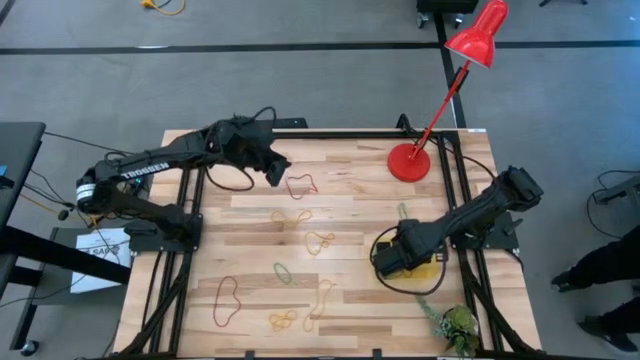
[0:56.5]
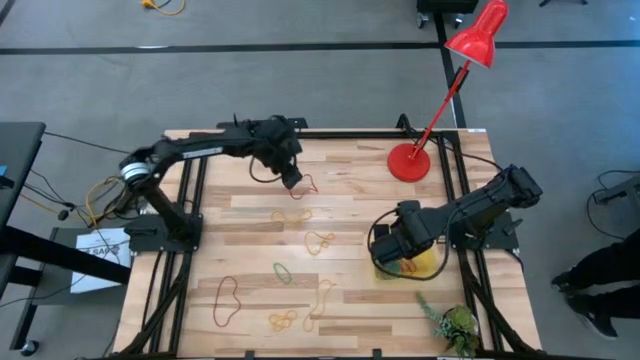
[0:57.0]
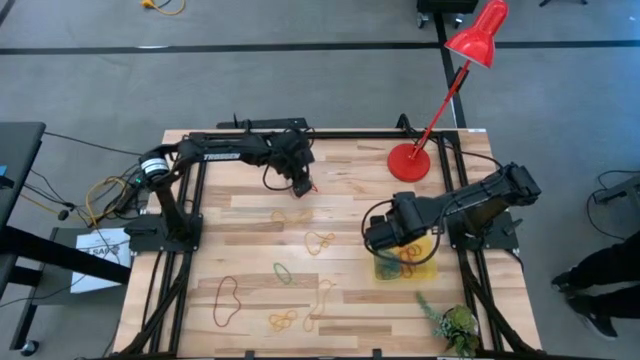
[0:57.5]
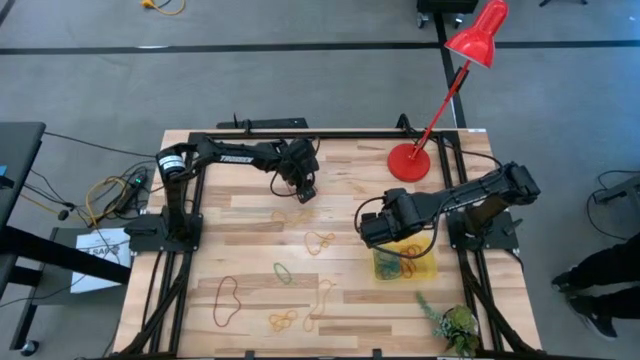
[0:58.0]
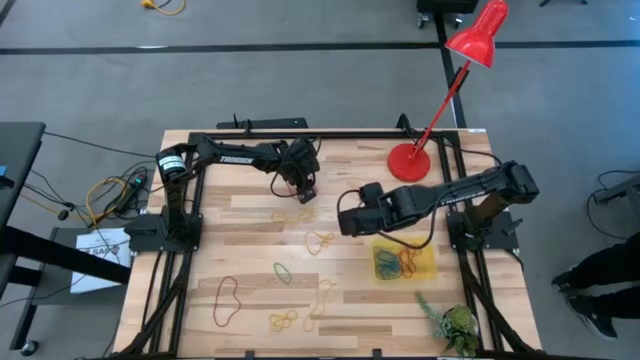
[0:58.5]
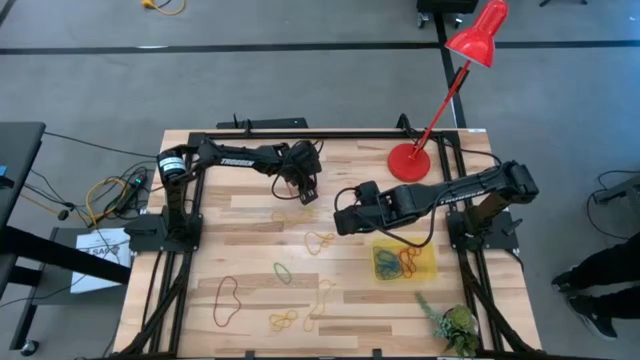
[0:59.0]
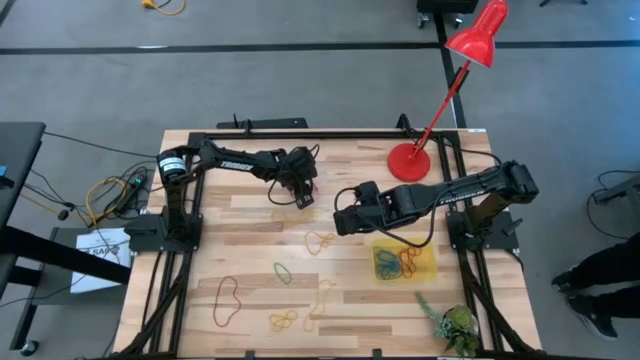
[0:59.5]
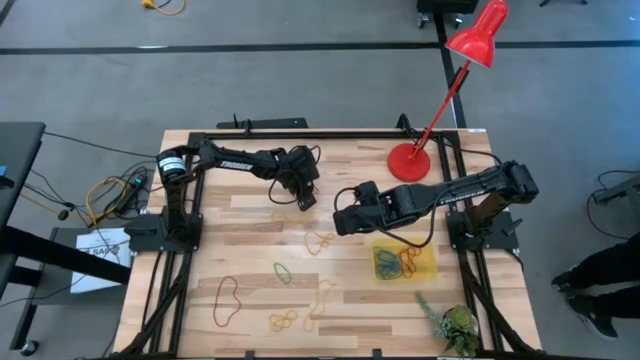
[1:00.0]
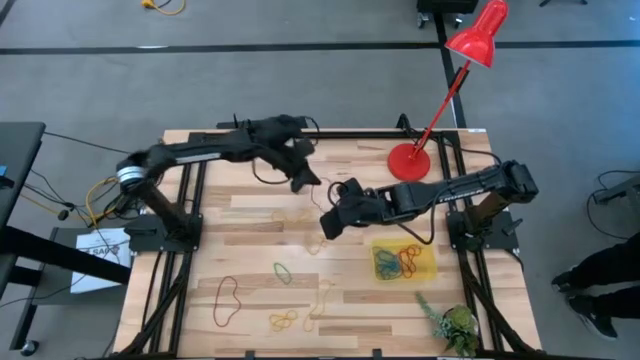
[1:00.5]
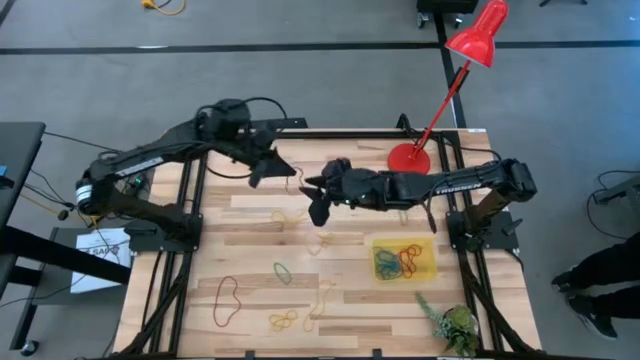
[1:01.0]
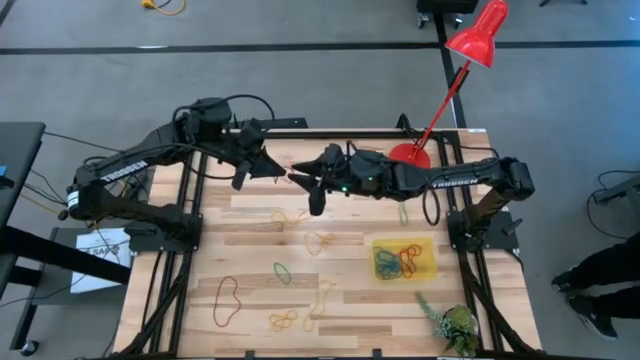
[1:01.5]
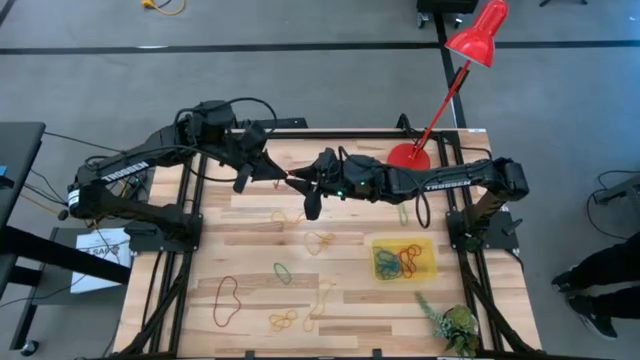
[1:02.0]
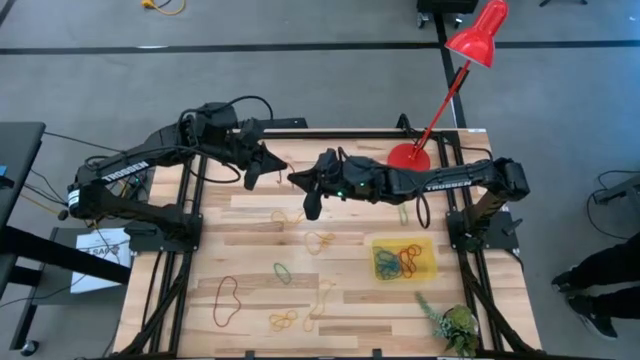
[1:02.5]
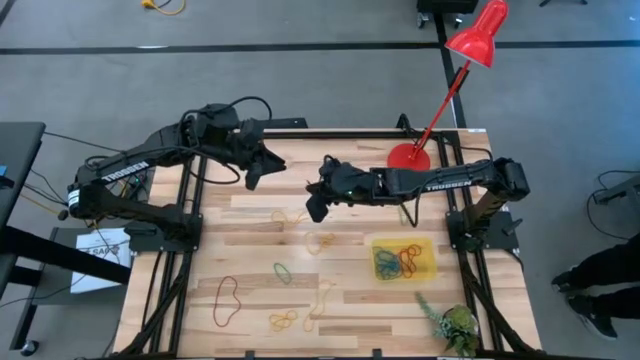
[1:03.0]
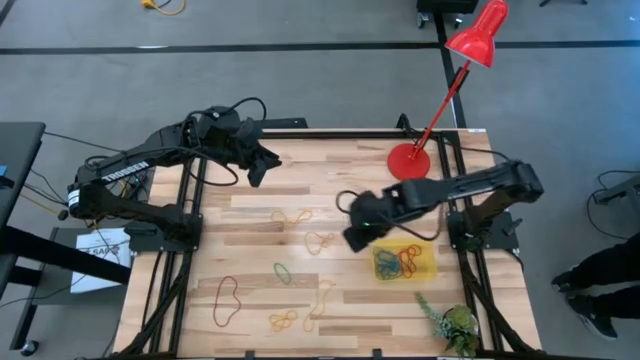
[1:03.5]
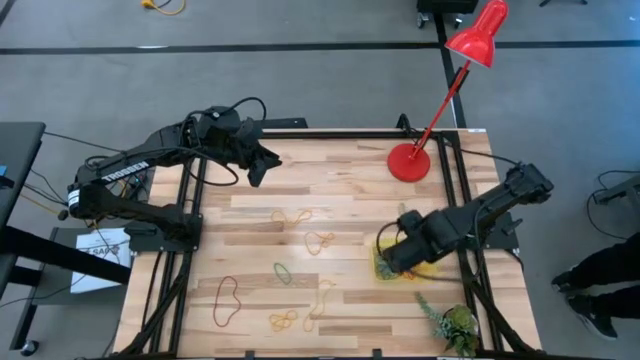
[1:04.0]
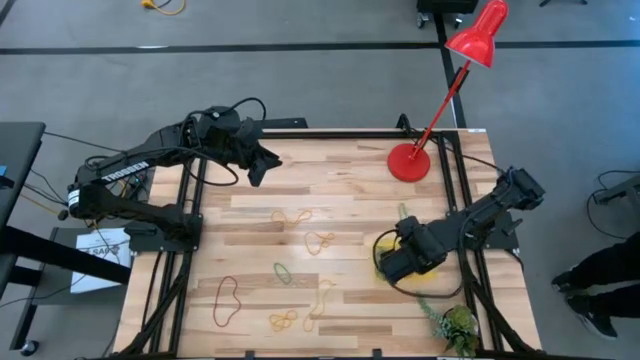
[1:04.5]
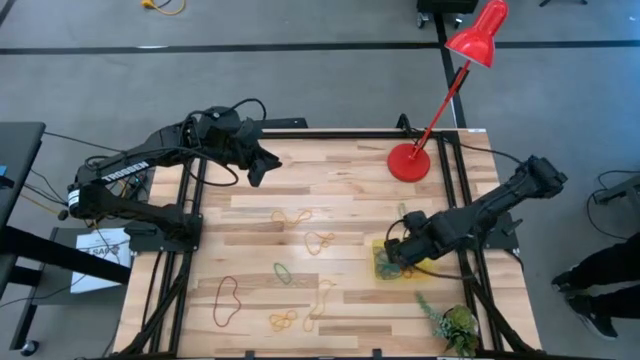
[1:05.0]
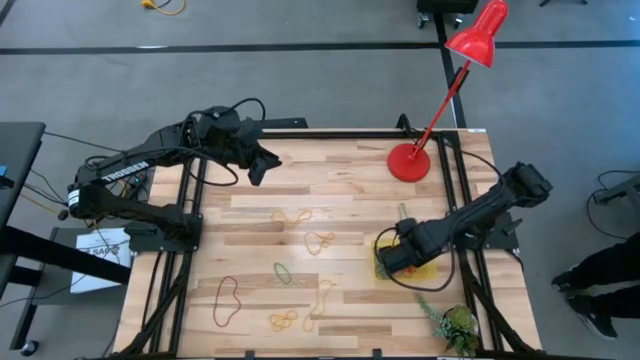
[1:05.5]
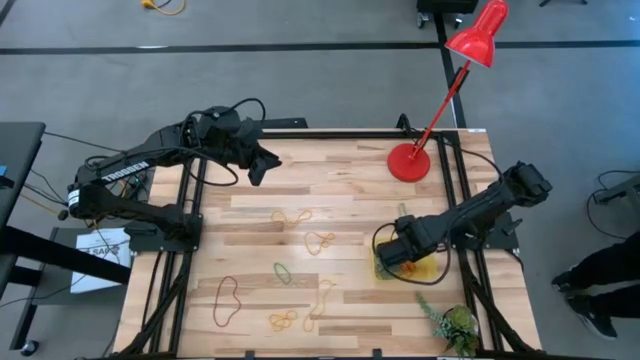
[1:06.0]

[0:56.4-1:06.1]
Task: Pick and place items into bin
Put the red rubber band into the yellow bin

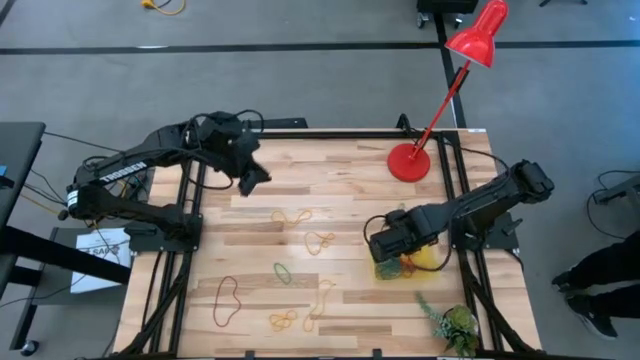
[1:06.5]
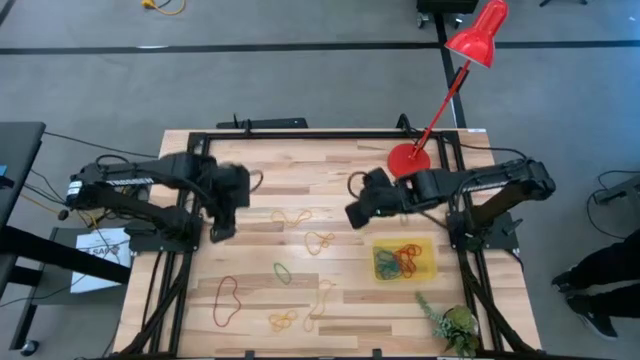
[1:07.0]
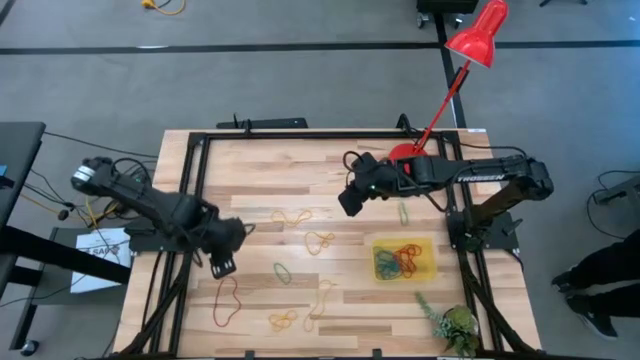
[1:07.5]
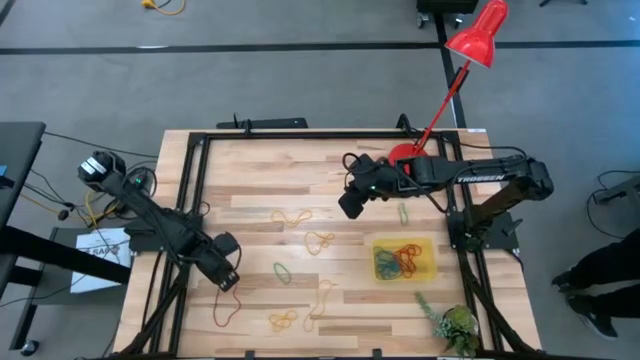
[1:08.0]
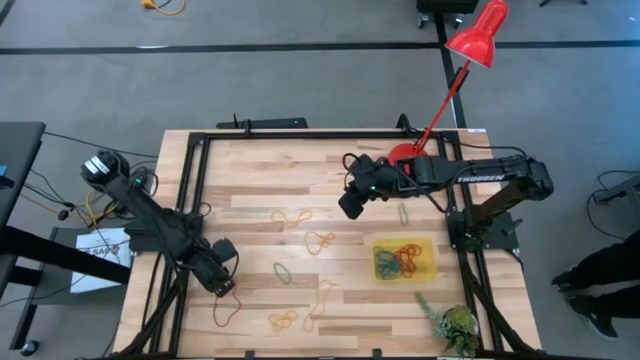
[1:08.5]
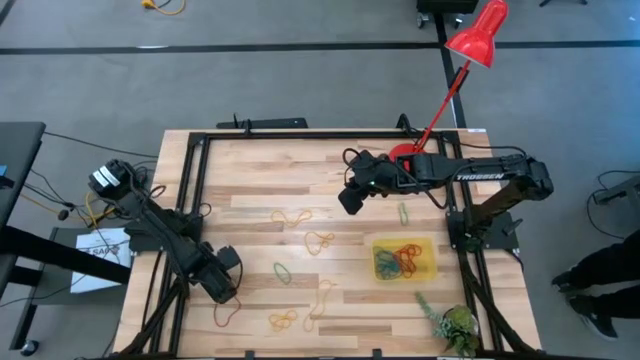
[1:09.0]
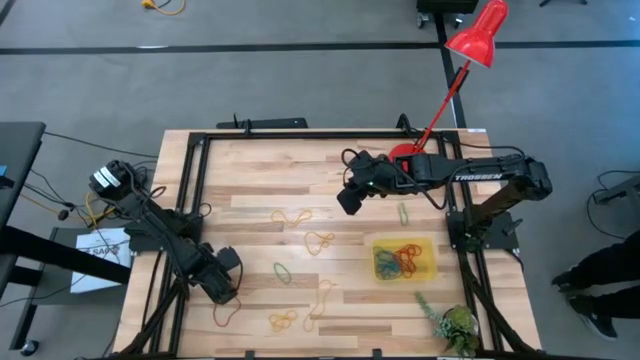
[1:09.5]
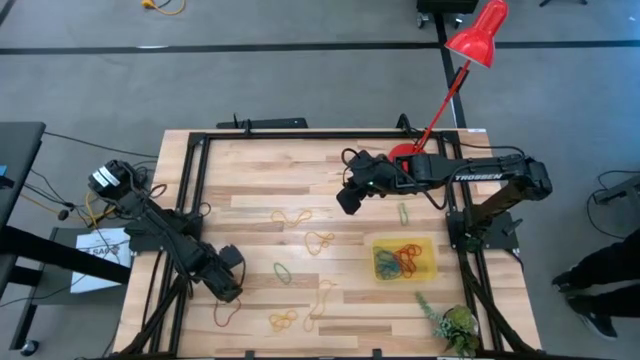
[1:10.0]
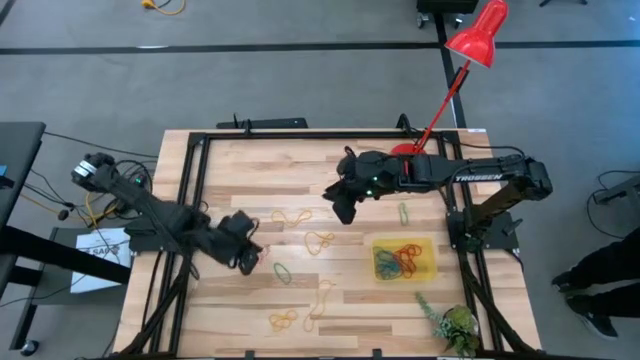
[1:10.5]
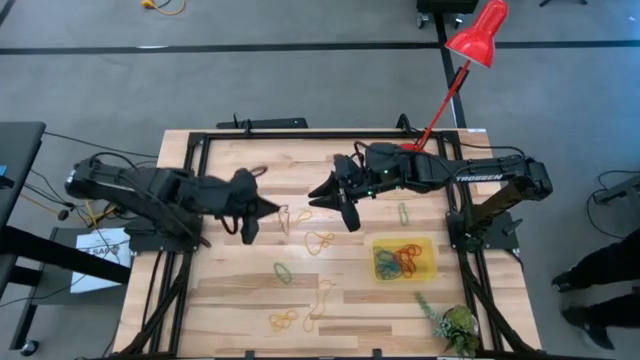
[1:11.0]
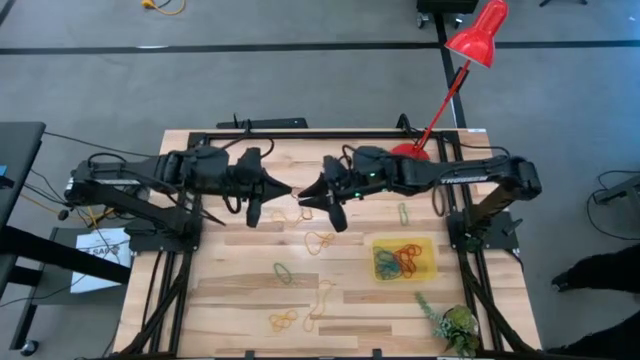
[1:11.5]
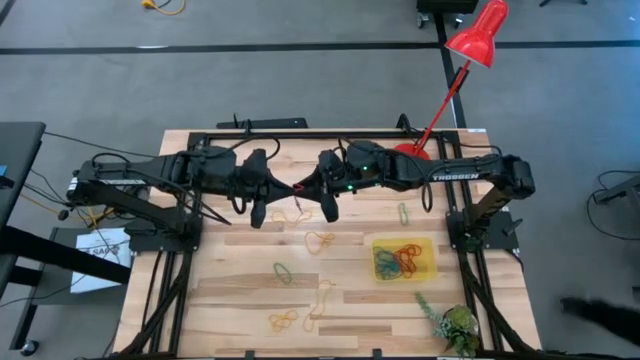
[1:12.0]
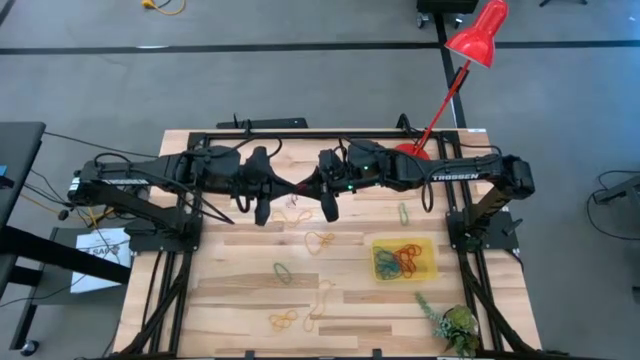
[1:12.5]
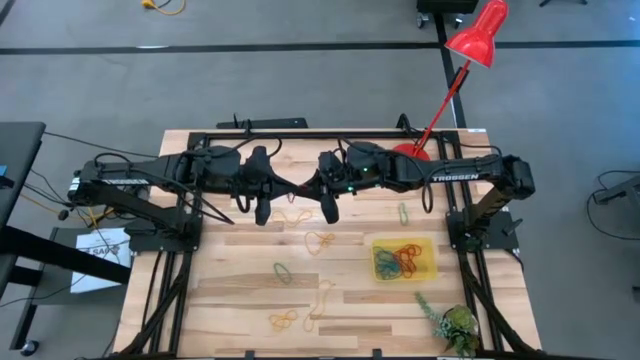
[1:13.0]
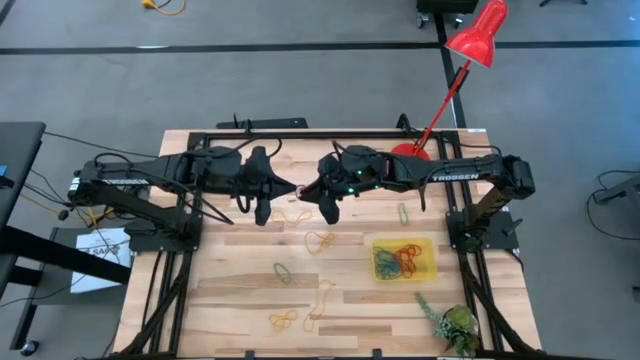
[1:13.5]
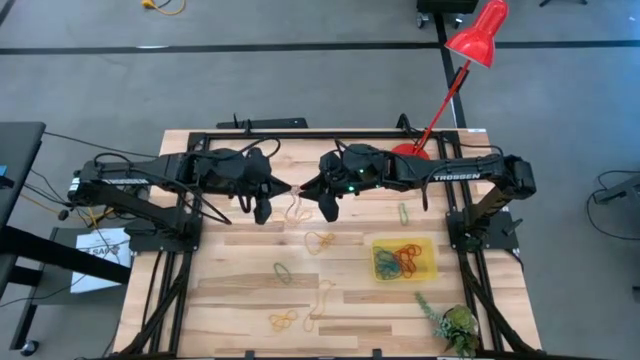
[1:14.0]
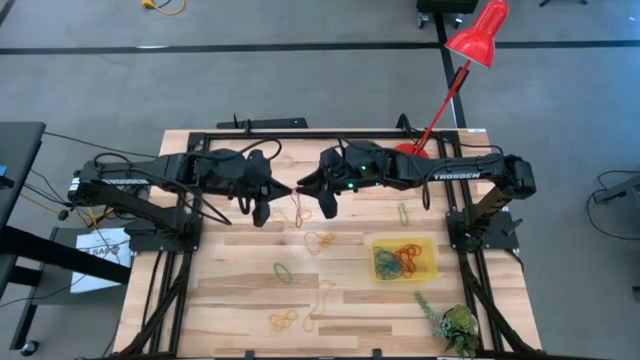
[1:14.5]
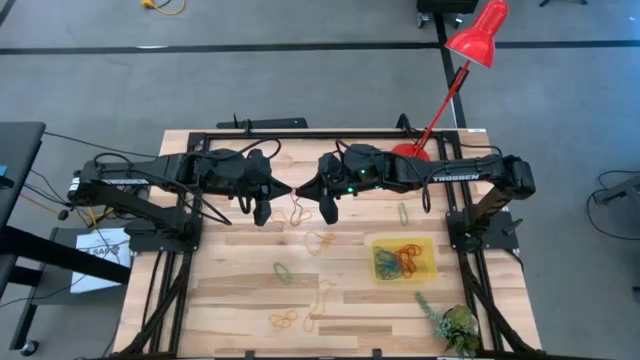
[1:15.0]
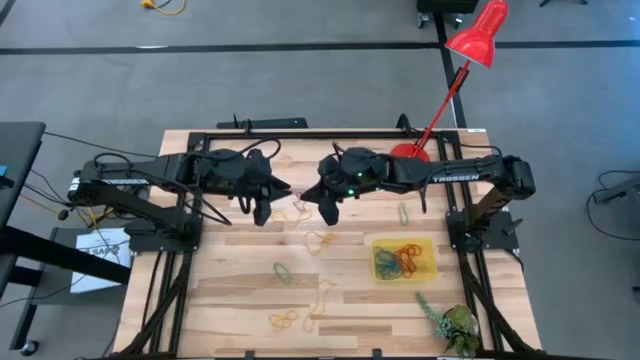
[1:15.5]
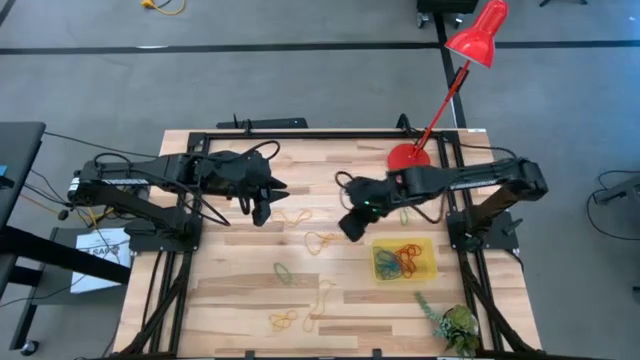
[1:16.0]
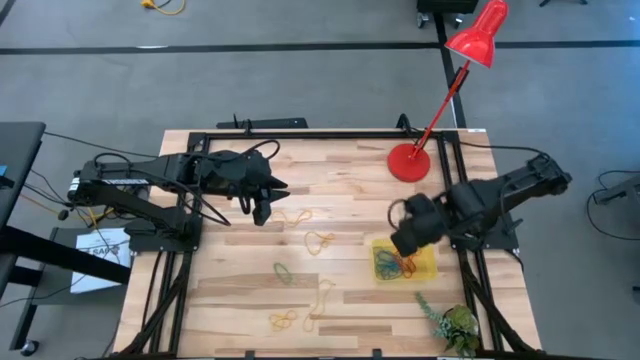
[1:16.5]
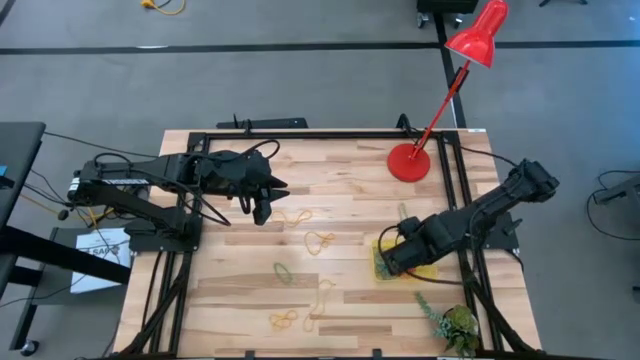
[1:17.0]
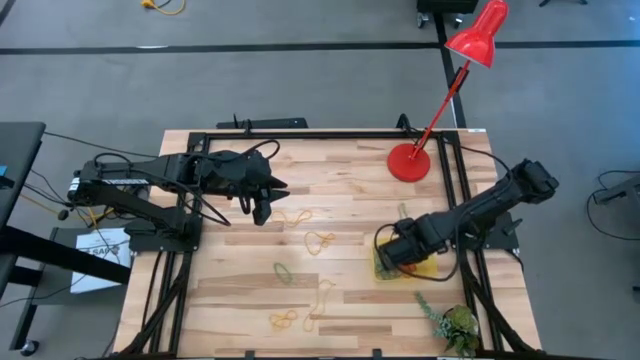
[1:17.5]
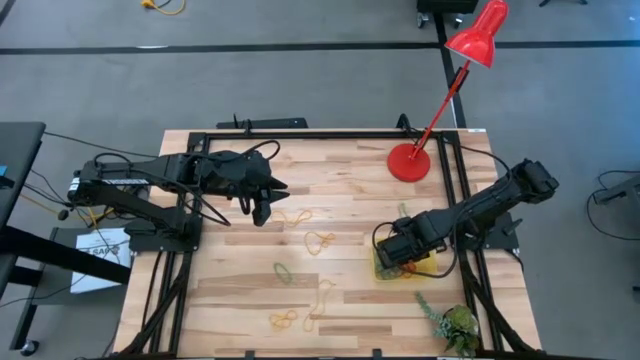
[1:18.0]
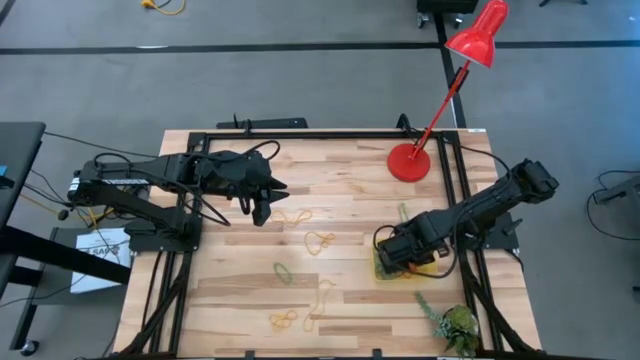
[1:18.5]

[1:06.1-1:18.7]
Put the red rubber band into the yellow bin
